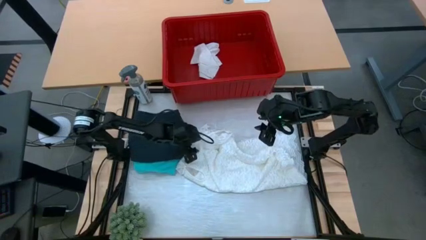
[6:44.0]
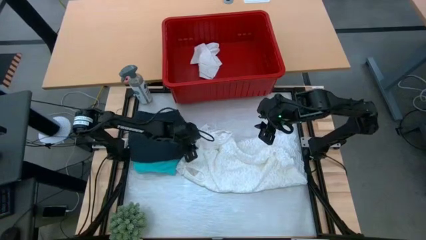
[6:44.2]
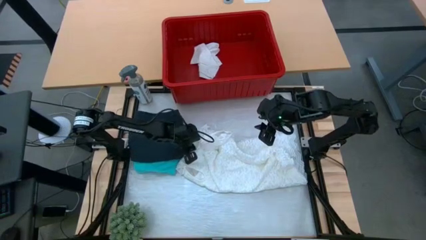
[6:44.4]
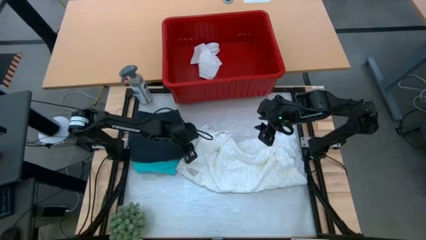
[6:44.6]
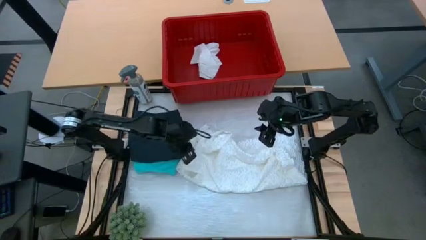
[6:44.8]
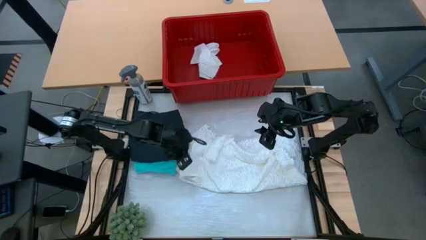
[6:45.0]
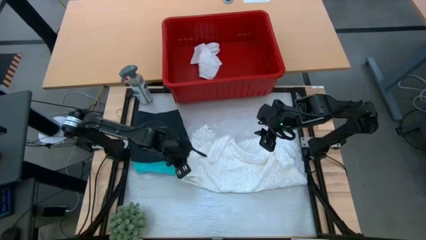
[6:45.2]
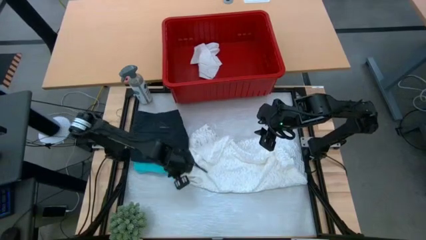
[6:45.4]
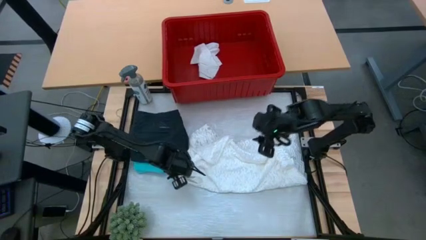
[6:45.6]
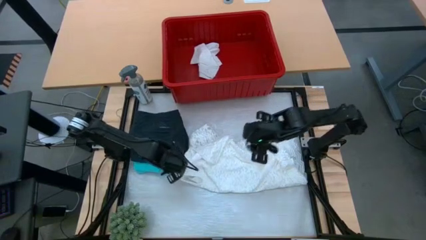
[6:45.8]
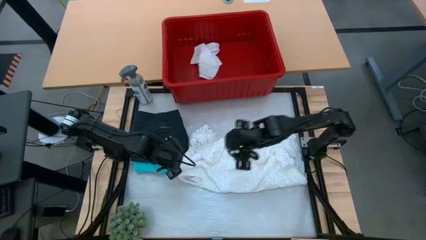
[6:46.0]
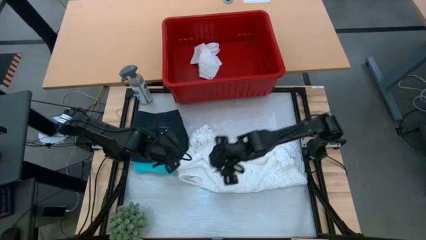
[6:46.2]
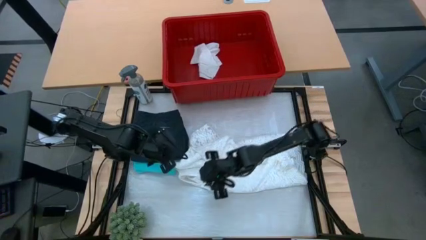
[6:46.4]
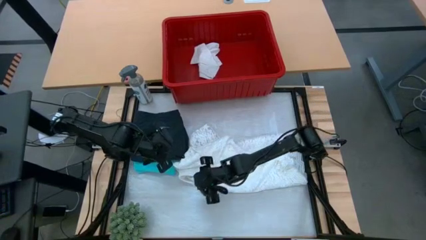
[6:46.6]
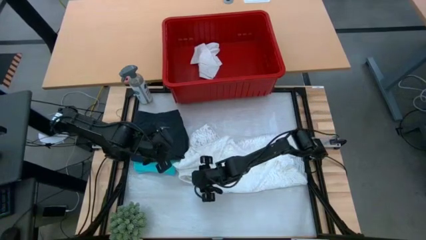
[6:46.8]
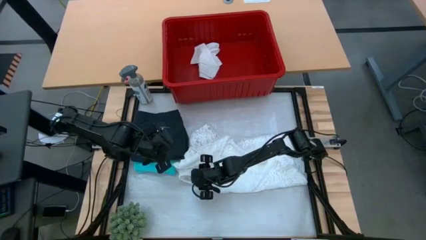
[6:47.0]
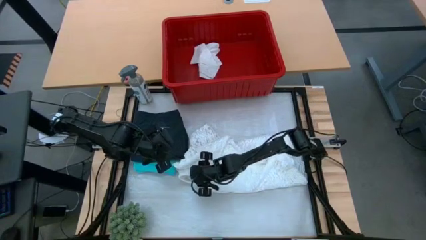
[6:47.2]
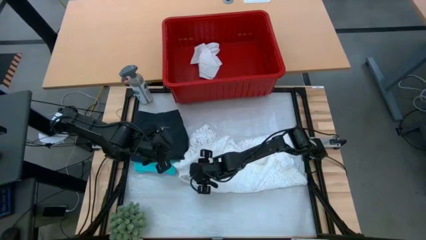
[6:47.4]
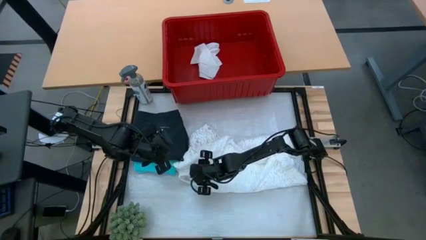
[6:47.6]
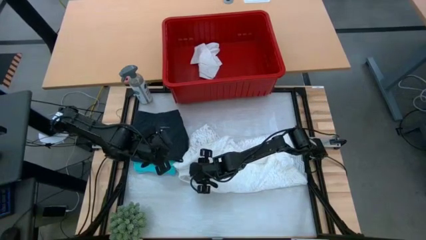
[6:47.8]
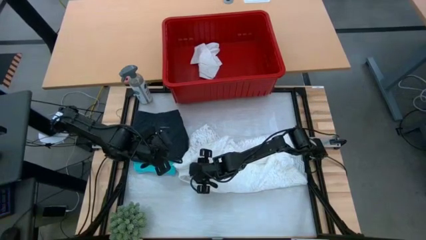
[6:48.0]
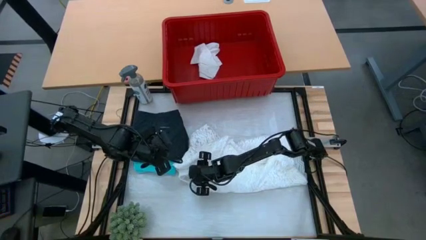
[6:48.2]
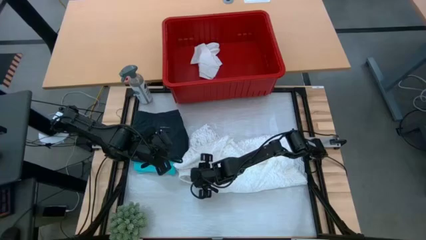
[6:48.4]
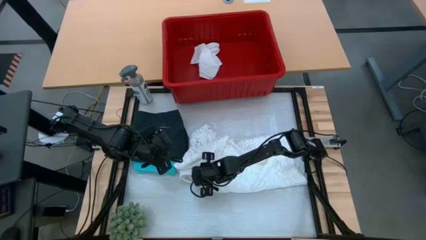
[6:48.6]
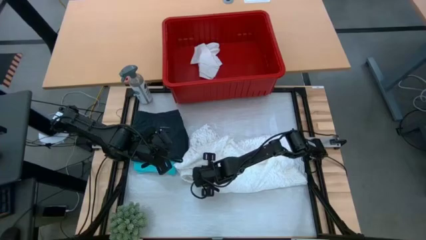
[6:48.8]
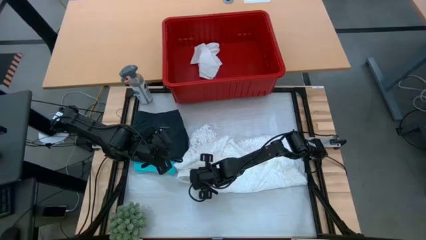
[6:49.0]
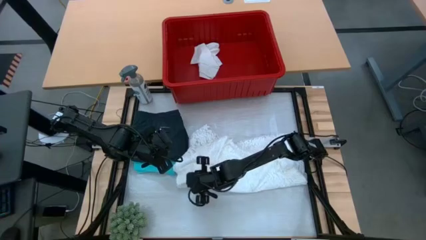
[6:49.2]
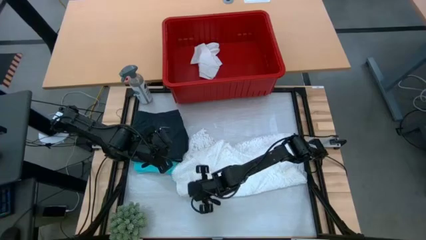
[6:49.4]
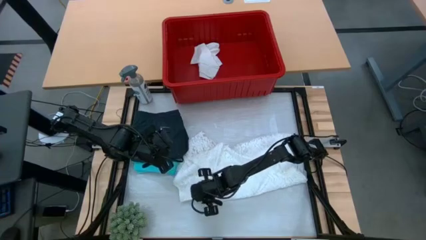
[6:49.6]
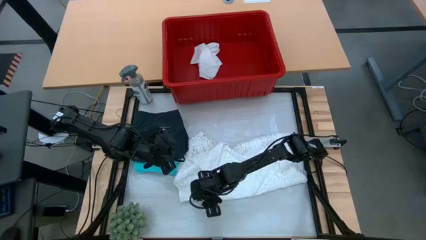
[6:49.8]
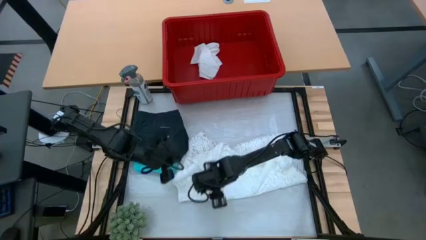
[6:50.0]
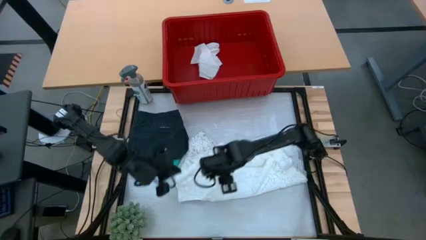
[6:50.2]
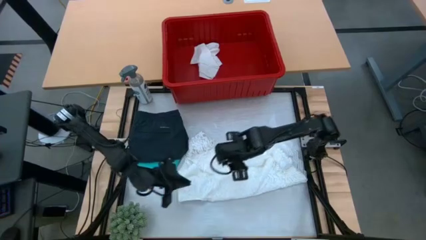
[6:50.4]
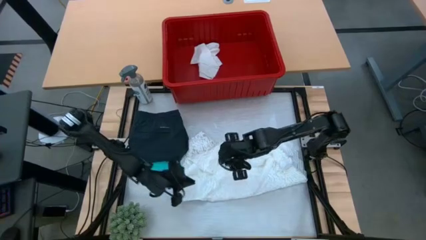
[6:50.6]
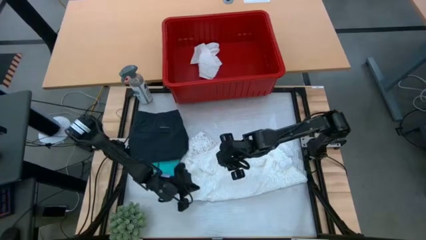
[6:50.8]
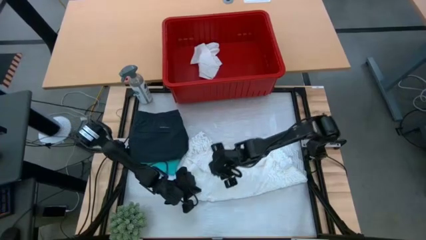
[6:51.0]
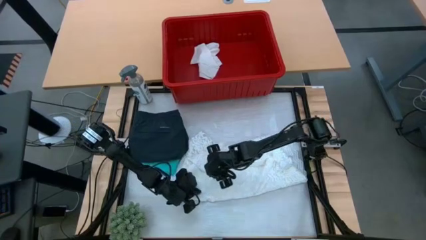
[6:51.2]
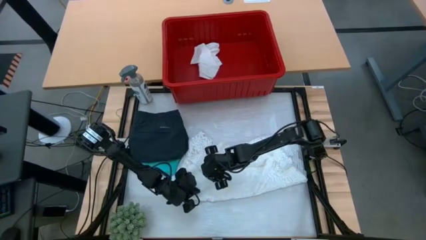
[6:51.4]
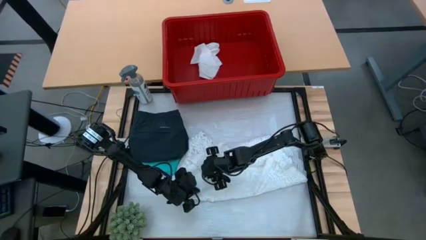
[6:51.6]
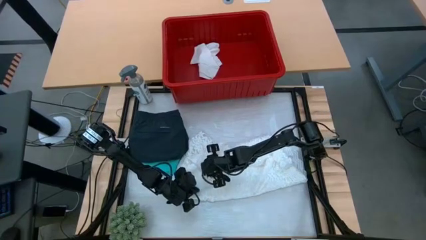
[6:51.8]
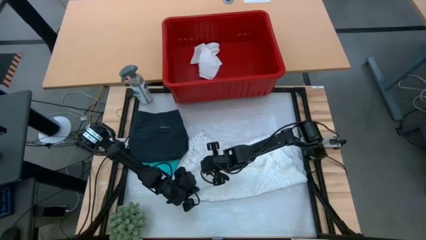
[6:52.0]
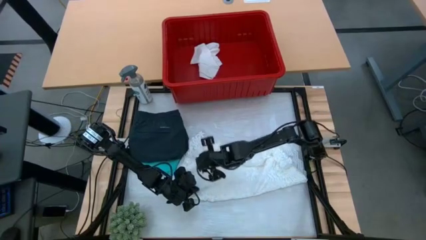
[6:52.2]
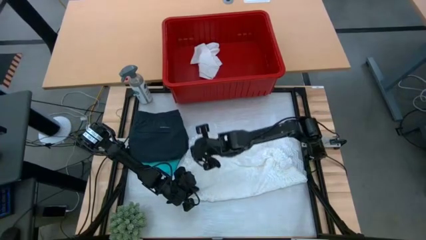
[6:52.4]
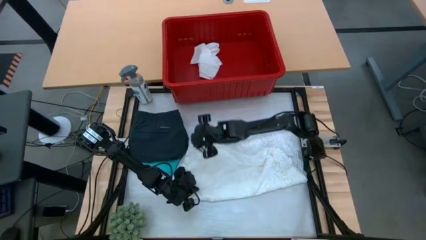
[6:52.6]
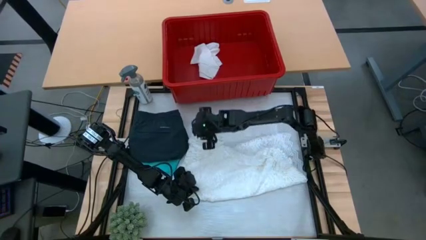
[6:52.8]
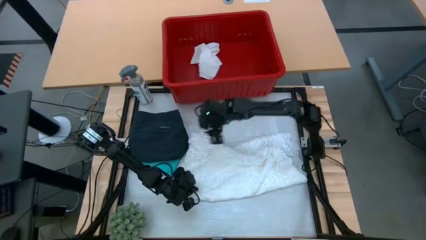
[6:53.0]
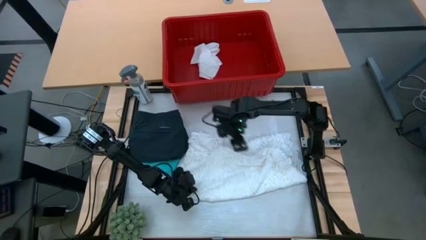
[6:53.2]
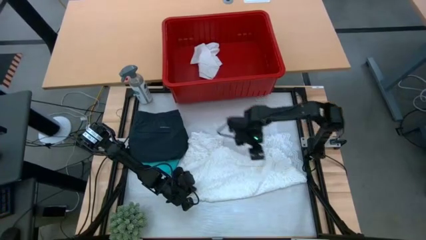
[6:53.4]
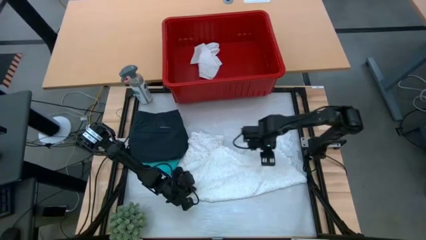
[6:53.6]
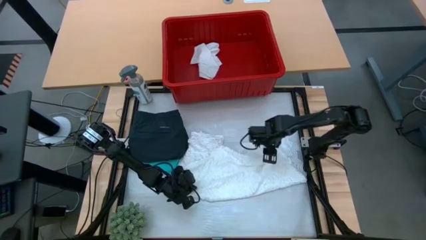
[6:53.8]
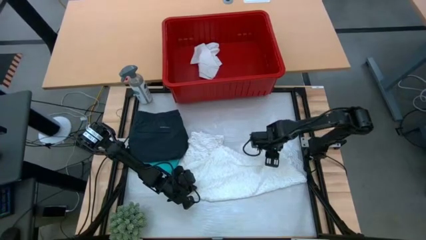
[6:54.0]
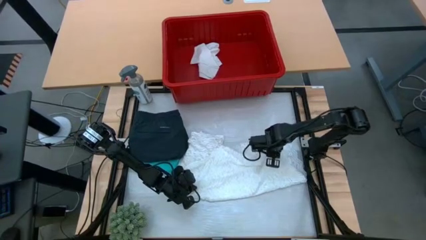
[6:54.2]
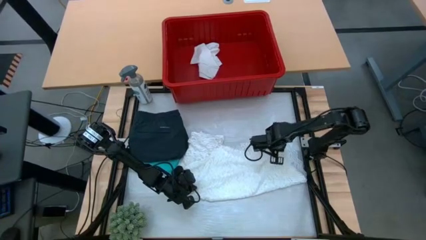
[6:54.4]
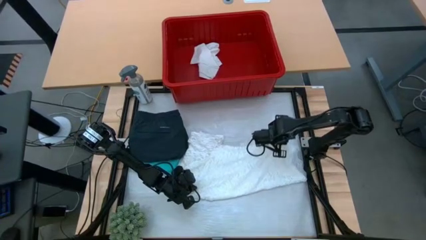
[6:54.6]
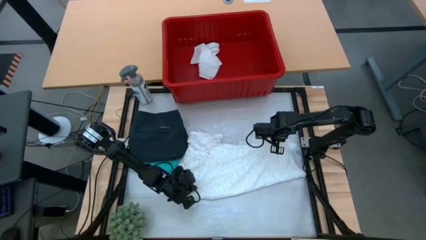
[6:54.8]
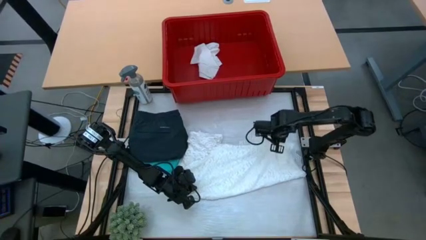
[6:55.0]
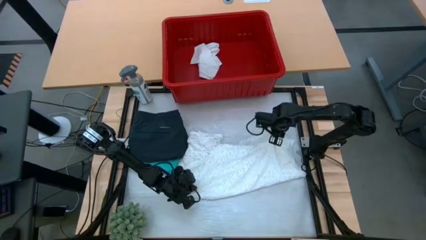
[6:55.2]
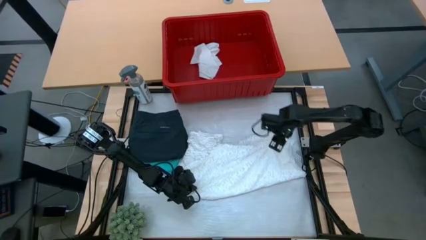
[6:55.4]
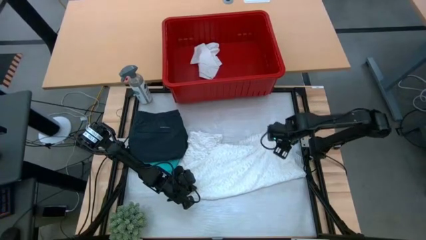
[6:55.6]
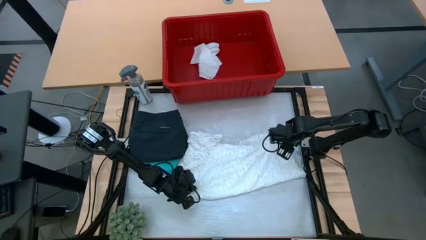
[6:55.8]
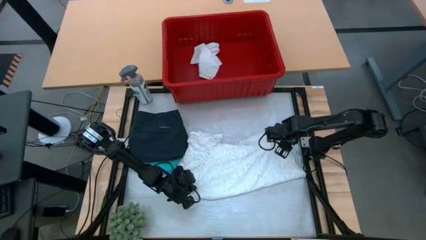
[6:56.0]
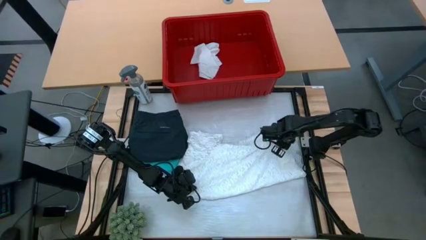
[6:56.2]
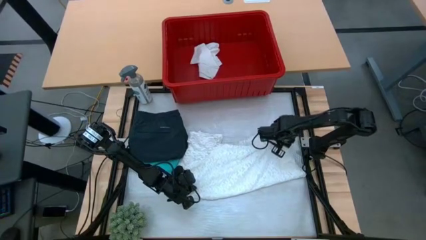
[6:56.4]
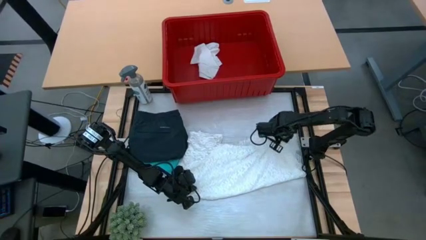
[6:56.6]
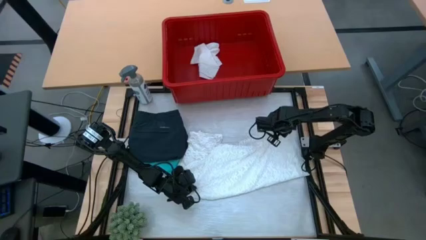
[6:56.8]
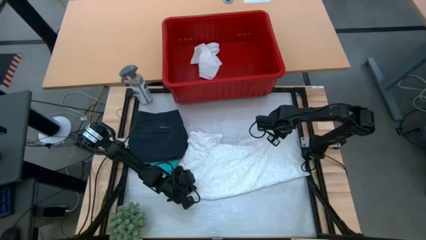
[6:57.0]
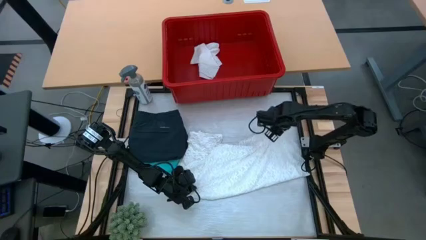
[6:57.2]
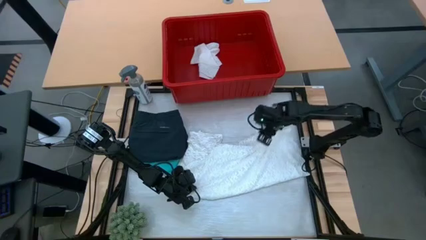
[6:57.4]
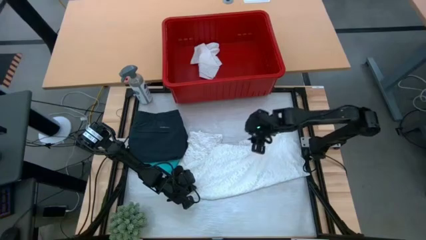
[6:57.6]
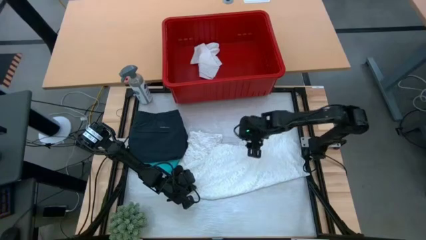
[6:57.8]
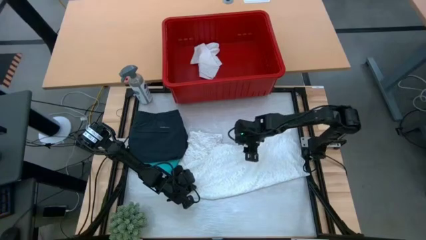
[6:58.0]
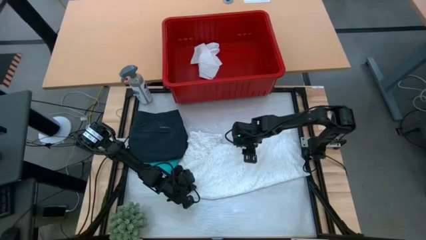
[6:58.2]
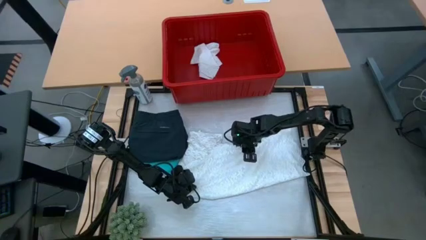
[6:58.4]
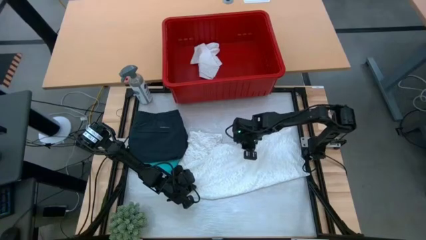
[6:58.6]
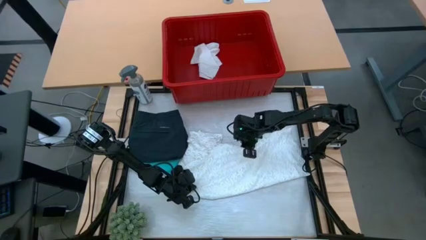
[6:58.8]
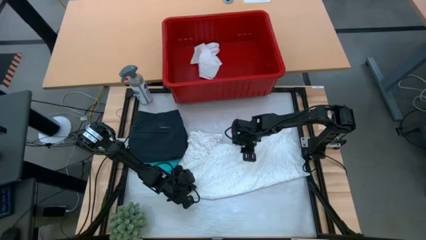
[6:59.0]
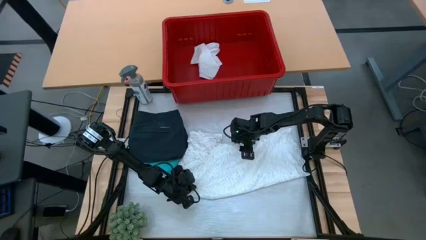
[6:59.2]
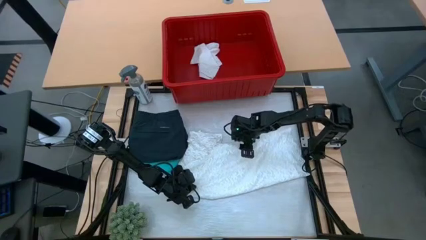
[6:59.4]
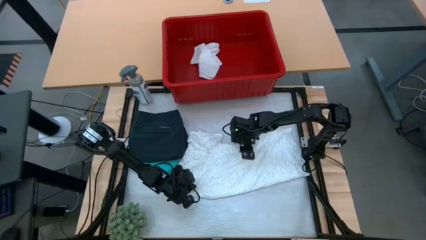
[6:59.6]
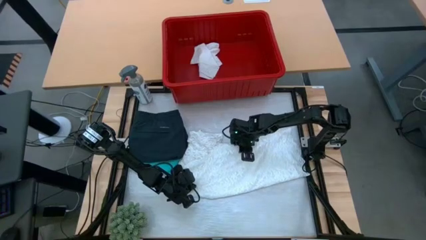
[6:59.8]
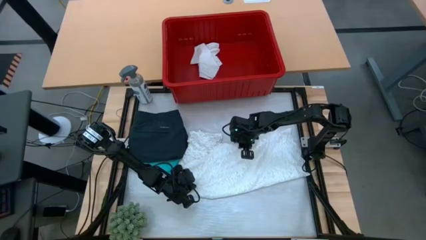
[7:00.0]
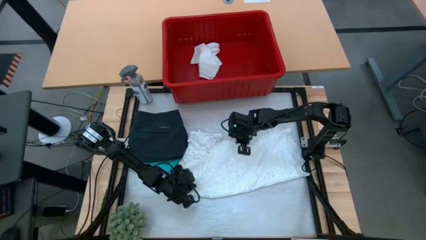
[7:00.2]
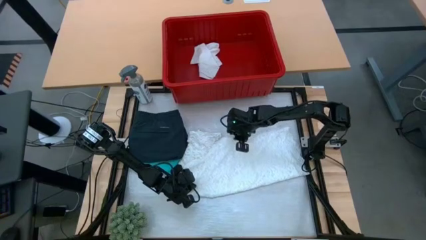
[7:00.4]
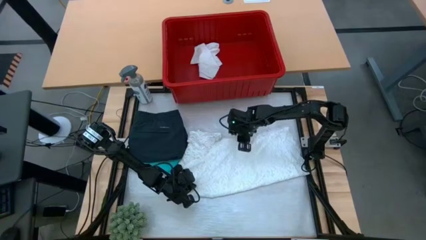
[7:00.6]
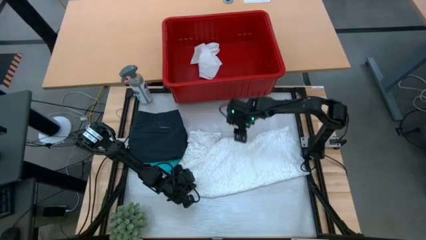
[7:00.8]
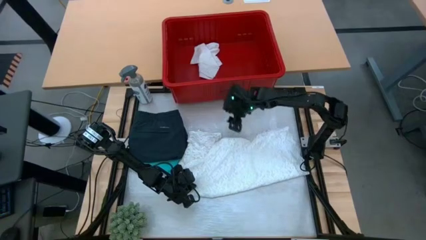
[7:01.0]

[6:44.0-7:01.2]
Task: Fold laundry
Fold the white dress
